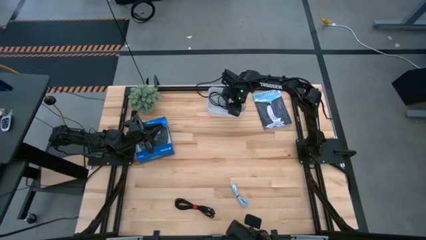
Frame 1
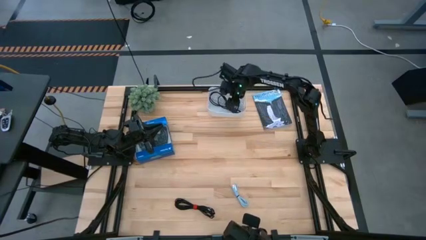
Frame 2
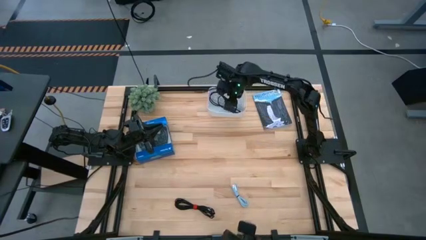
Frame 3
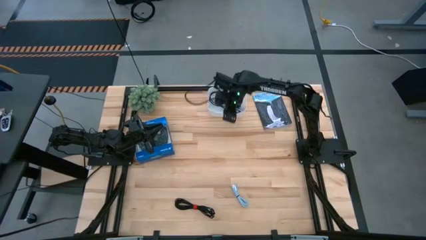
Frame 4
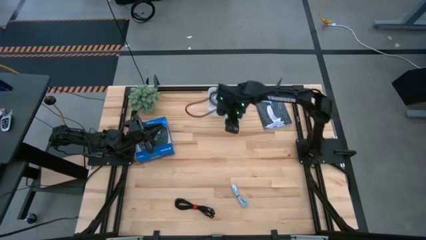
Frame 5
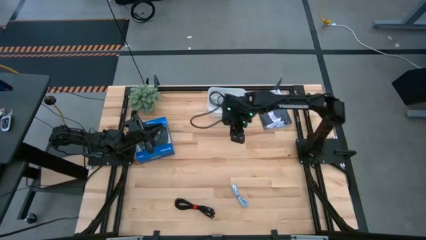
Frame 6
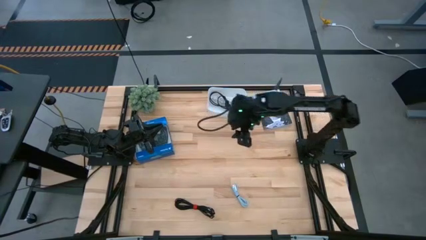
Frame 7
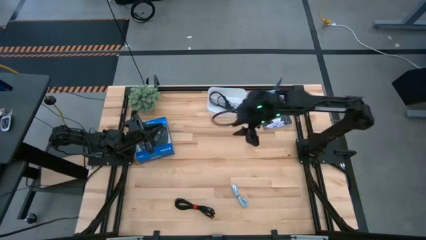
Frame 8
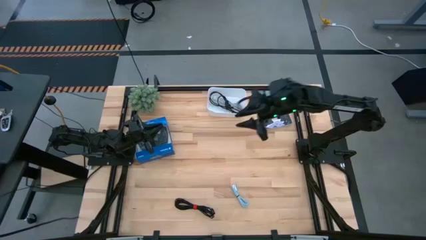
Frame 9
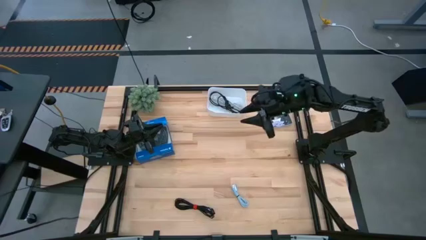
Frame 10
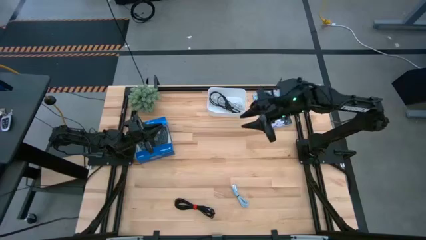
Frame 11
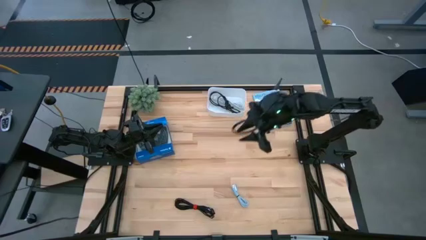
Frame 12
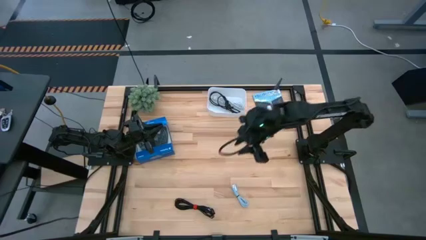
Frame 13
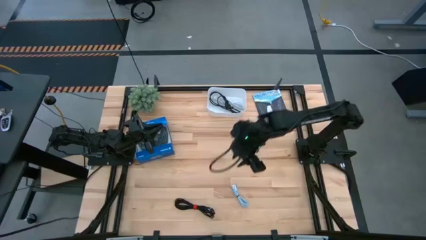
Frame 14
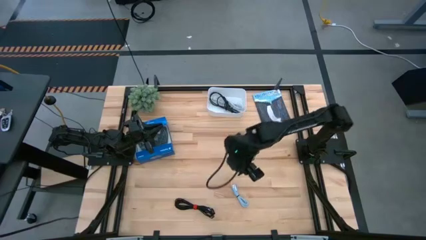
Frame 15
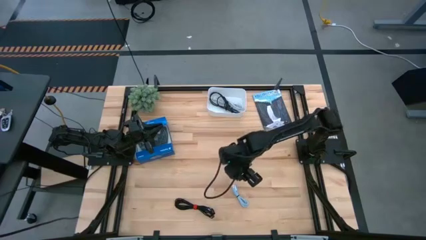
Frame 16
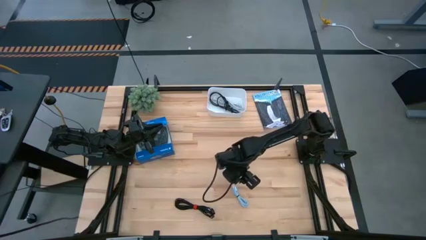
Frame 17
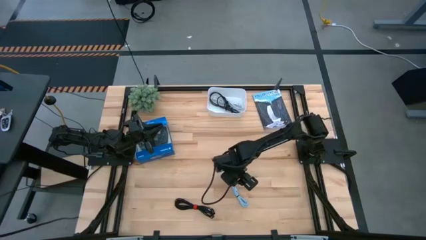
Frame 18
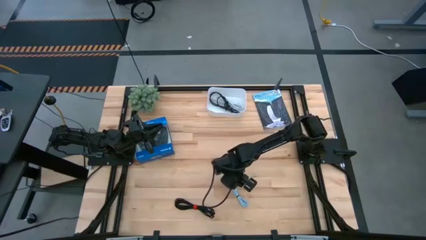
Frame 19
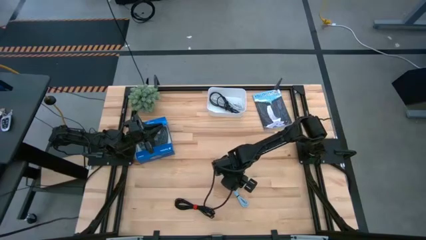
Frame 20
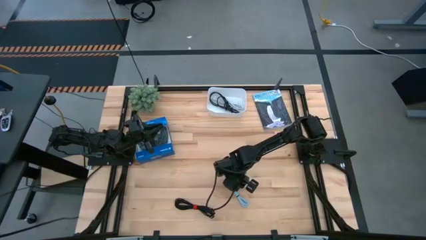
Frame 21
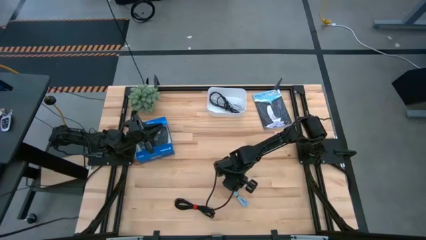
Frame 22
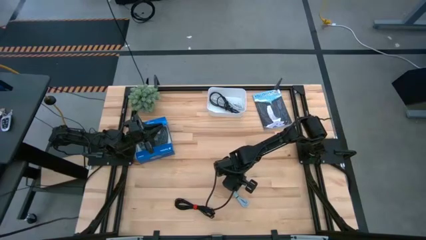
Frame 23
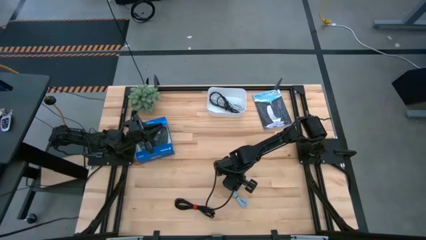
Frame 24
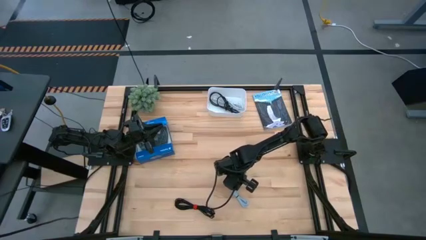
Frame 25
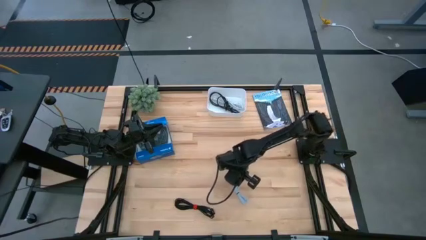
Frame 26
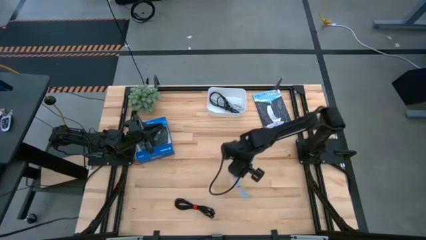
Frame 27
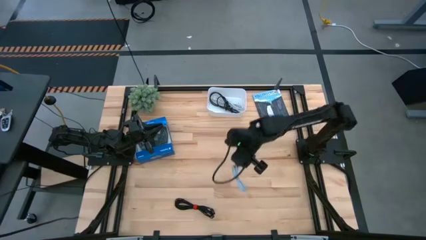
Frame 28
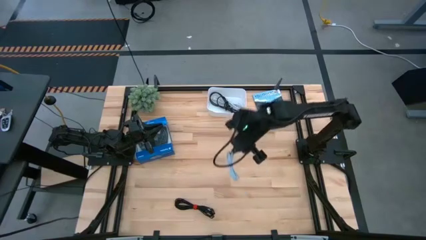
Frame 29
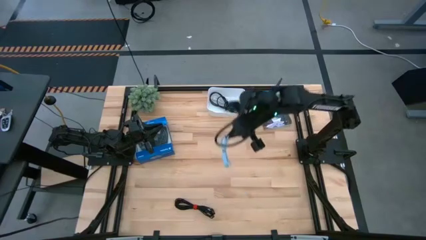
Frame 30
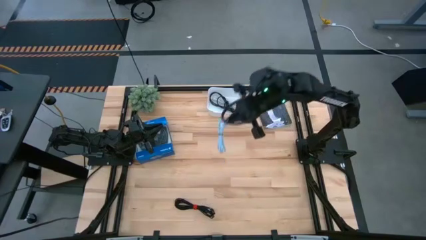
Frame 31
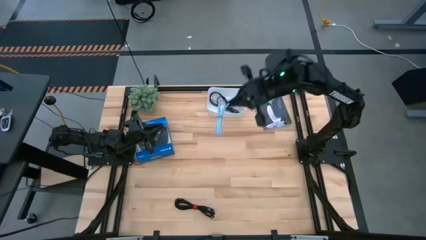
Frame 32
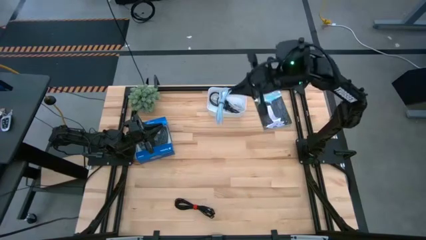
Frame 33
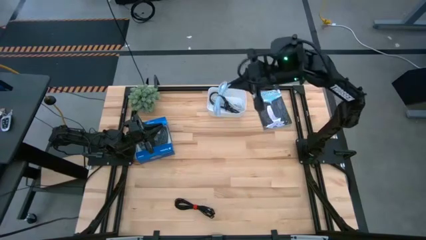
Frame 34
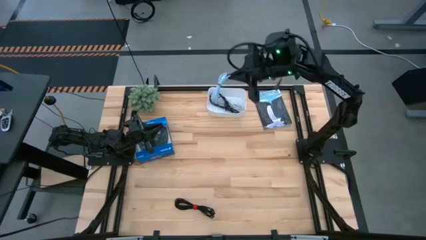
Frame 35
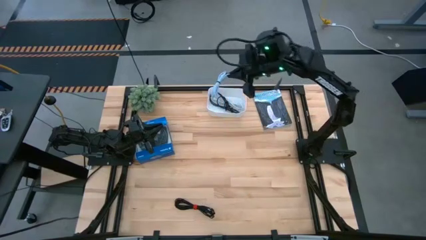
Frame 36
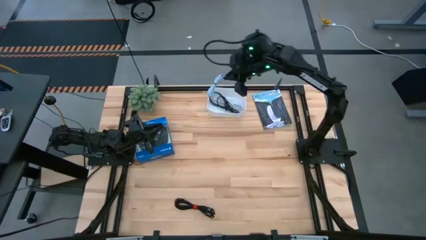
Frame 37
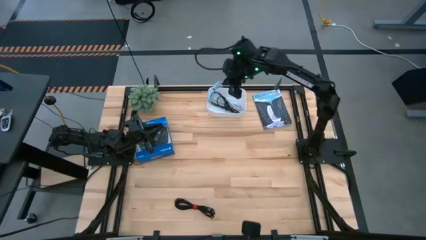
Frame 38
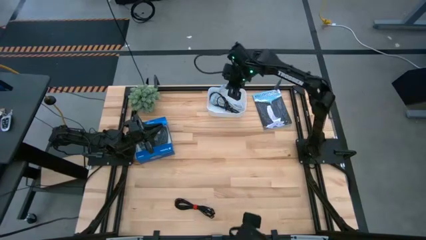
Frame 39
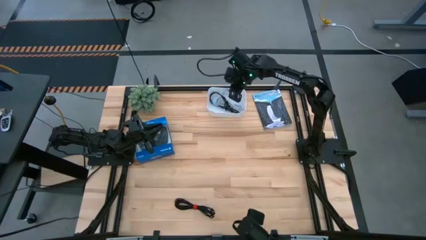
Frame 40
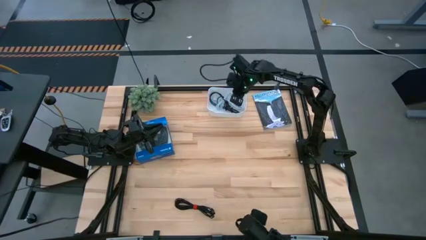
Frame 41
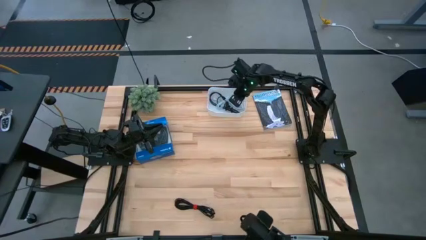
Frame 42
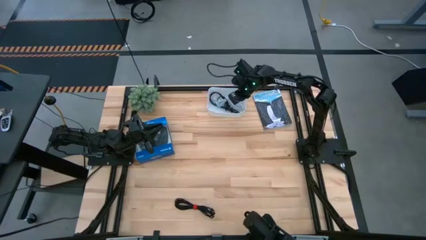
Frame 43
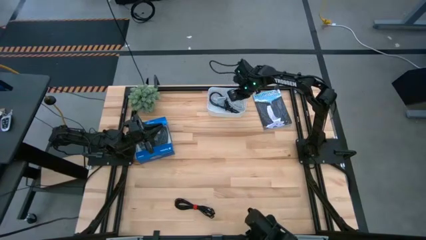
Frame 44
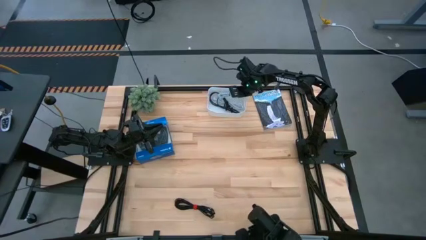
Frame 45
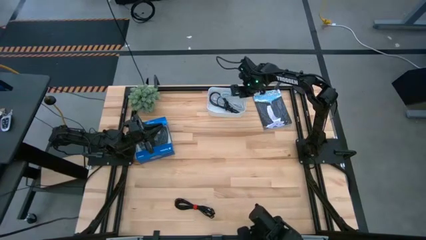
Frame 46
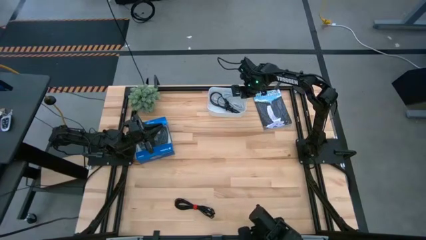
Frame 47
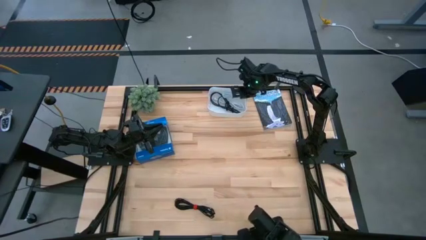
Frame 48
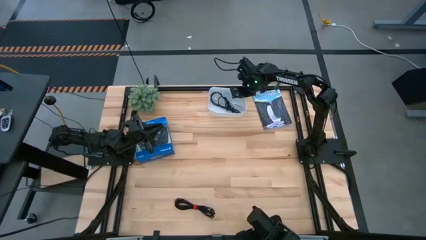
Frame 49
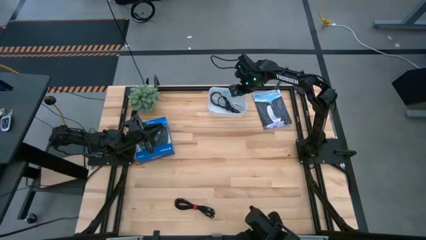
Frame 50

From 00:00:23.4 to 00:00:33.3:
Task: Pick and place USB-C Cables
Put the light blue USB cable into the white bin

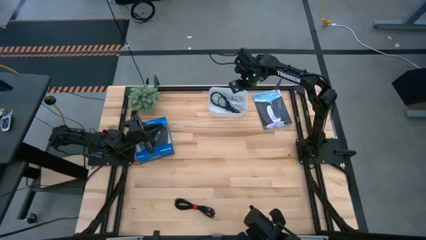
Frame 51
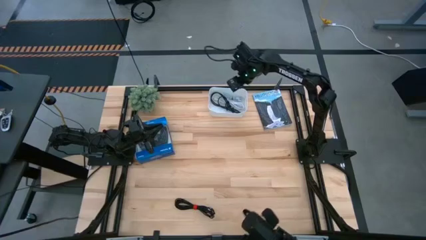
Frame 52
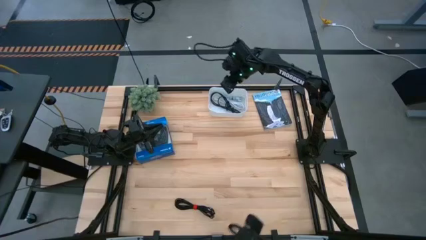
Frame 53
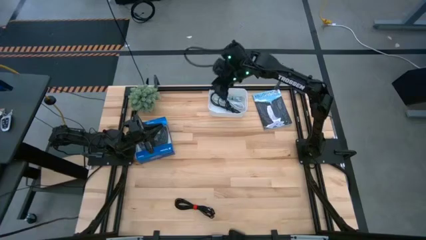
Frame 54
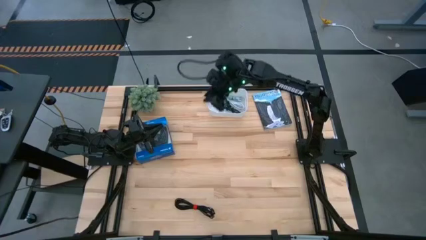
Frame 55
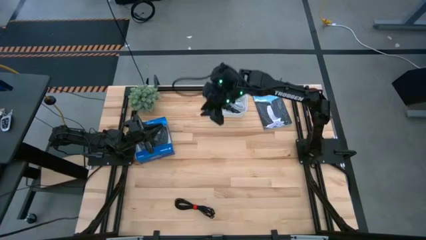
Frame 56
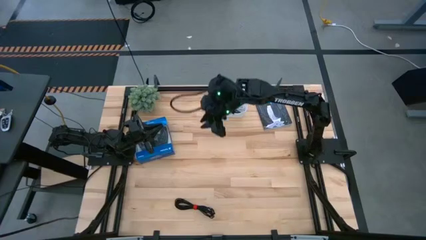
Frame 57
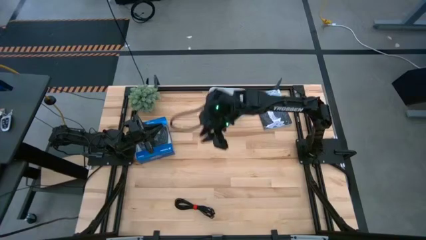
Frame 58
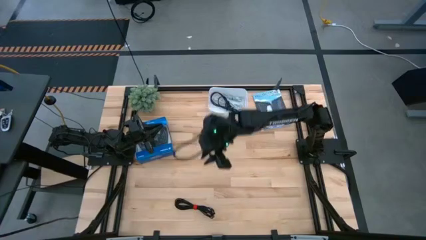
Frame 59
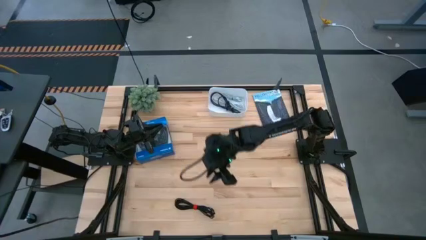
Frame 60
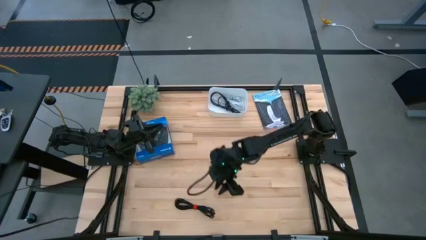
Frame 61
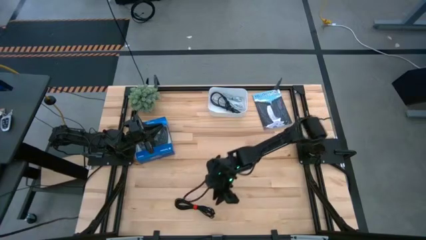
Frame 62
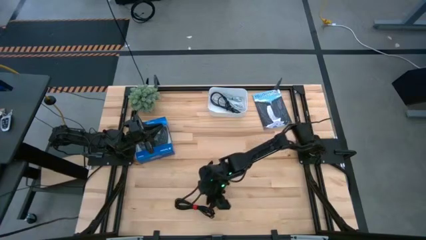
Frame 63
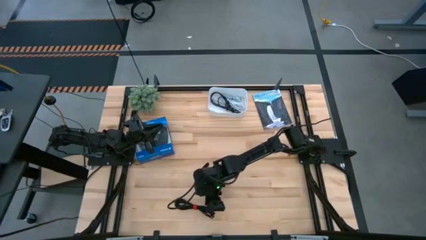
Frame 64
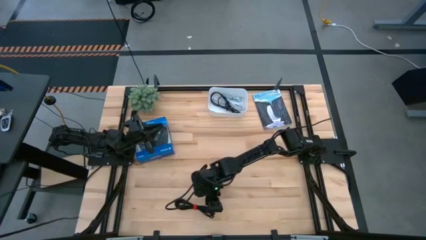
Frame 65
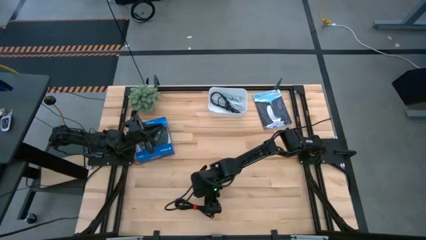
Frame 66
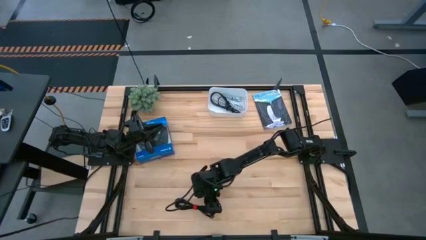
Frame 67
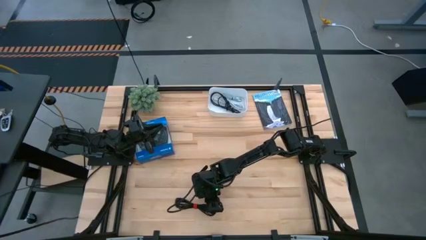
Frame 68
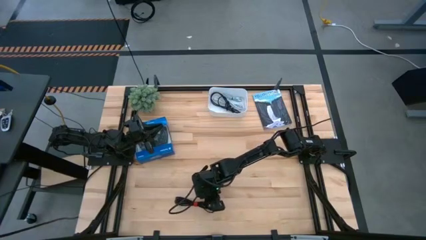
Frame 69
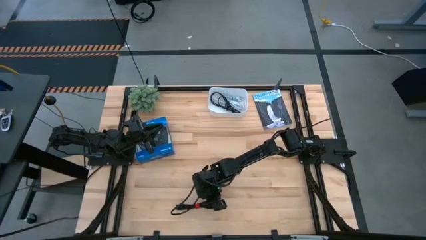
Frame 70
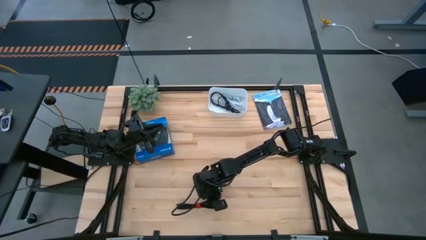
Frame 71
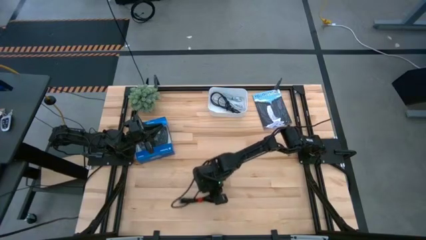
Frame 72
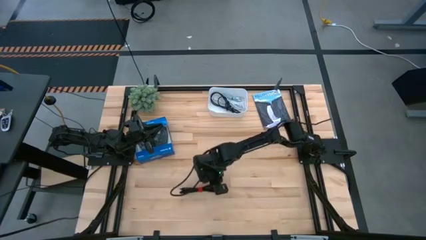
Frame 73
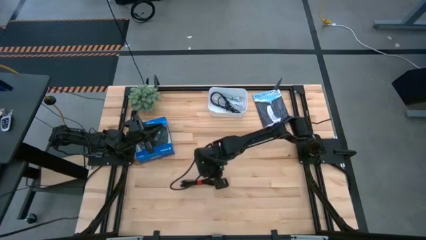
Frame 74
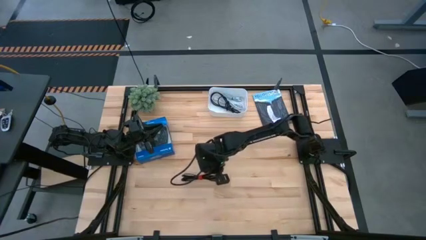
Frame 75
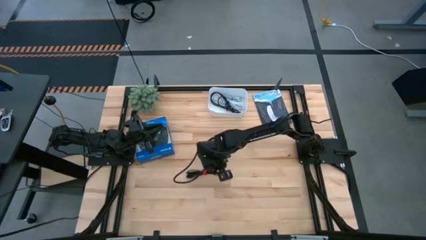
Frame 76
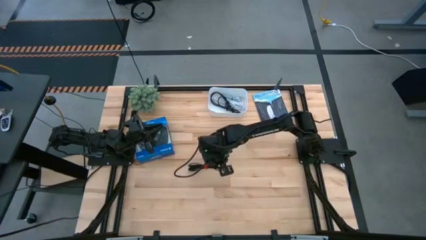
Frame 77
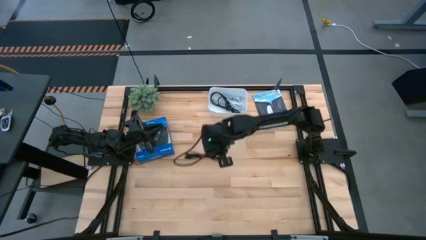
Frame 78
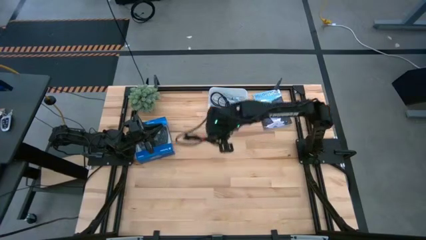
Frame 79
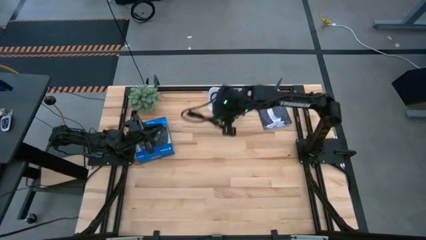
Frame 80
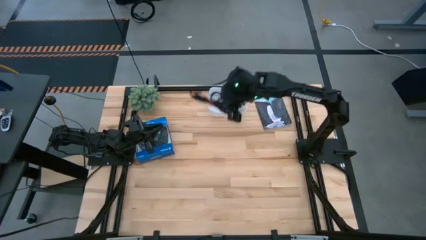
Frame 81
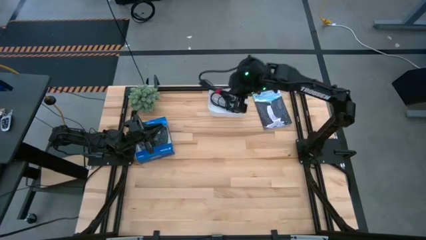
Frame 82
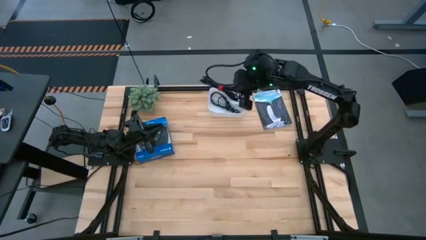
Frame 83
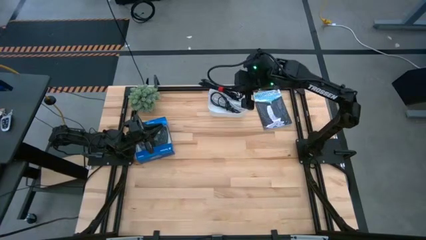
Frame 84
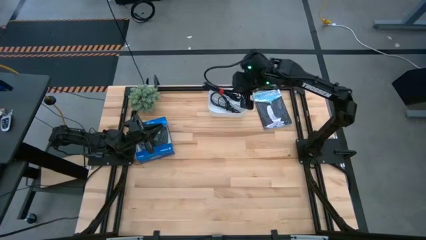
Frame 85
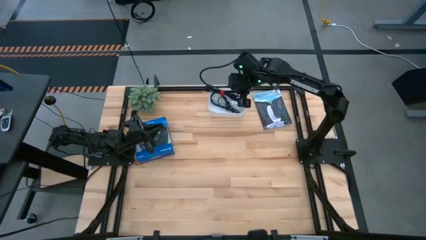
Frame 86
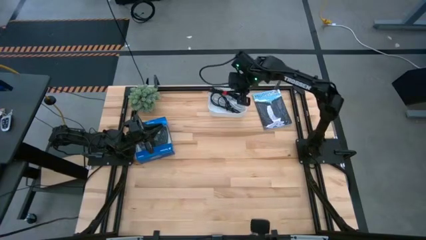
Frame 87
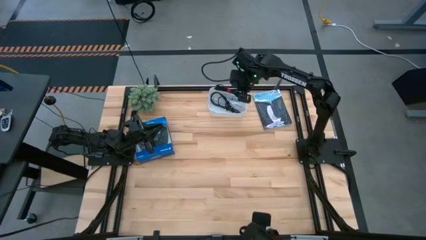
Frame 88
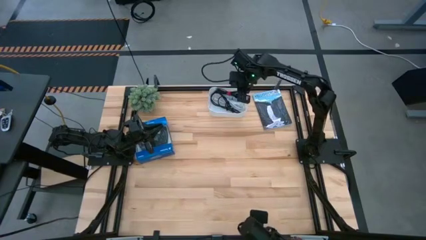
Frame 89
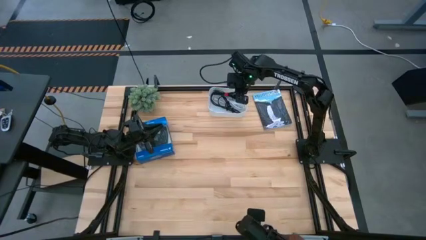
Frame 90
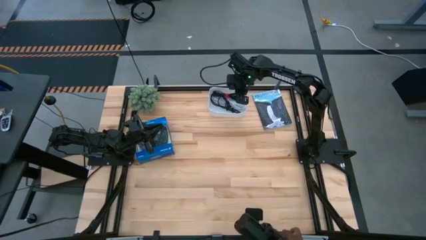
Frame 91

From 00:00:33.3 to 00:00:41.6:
Put the black USB cable into the white bin
